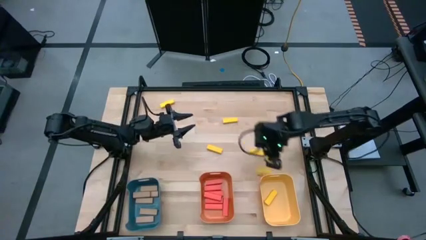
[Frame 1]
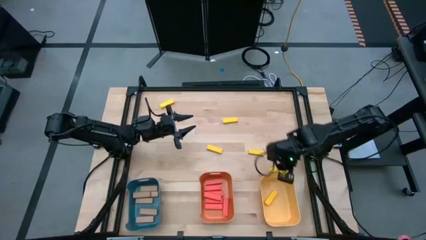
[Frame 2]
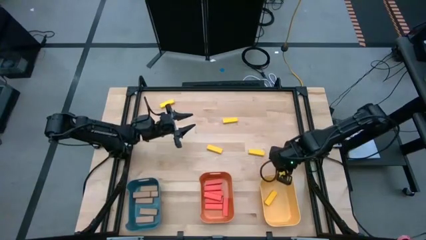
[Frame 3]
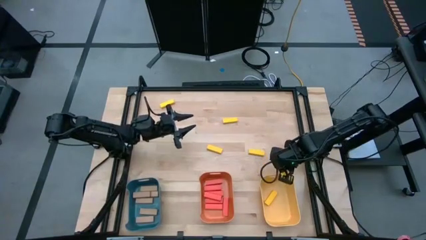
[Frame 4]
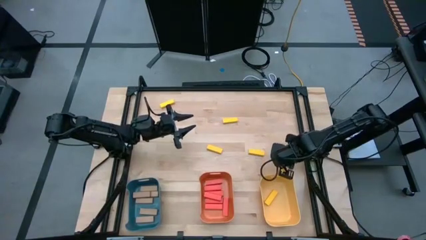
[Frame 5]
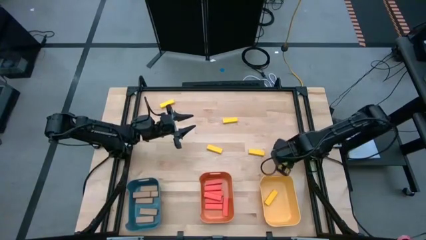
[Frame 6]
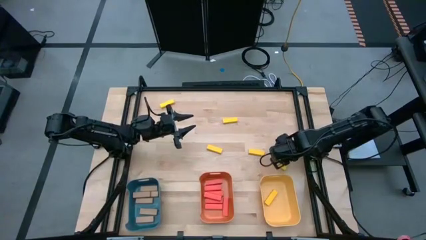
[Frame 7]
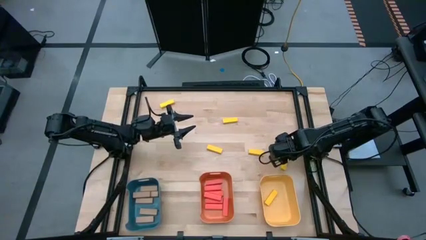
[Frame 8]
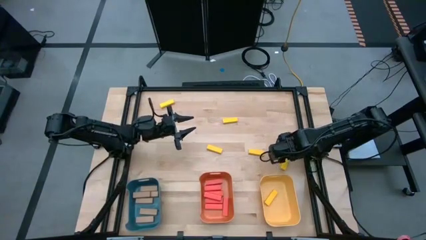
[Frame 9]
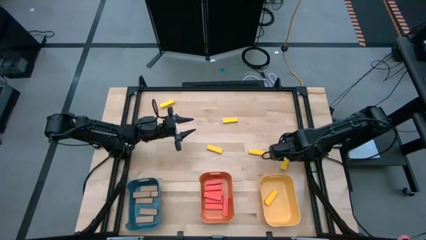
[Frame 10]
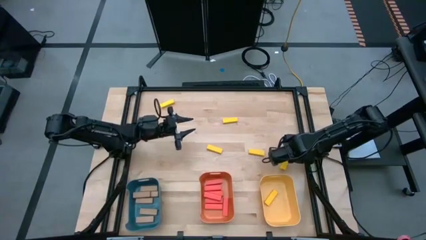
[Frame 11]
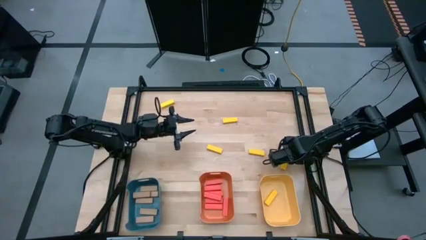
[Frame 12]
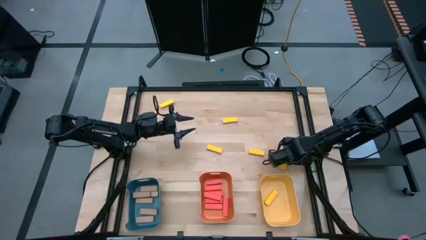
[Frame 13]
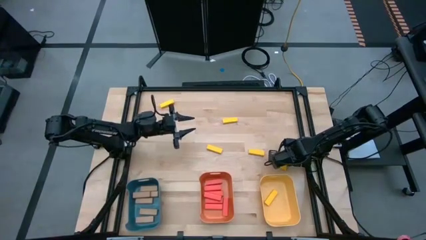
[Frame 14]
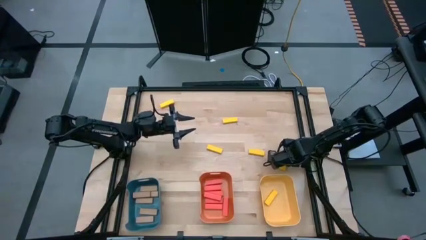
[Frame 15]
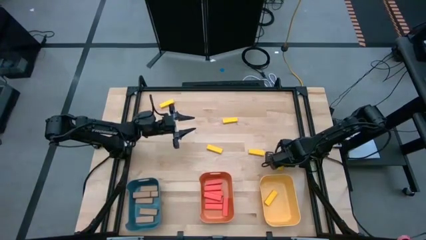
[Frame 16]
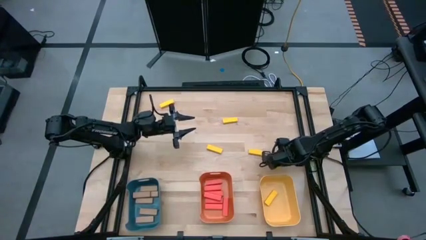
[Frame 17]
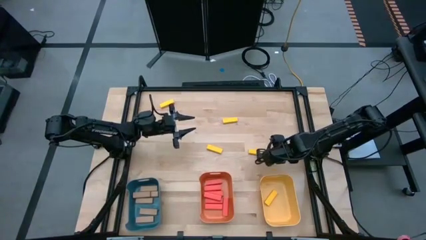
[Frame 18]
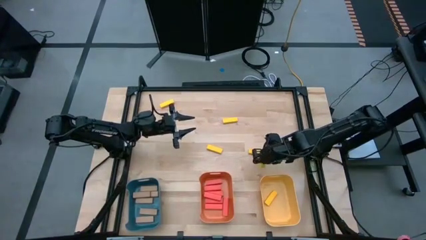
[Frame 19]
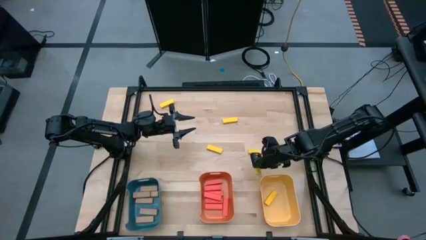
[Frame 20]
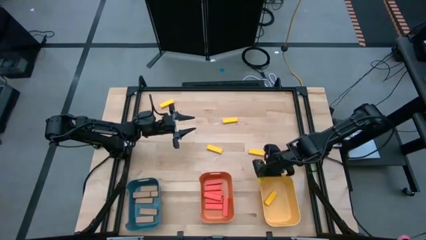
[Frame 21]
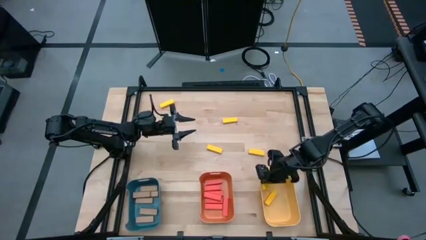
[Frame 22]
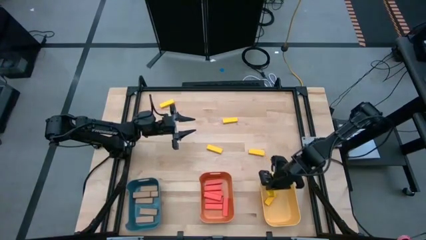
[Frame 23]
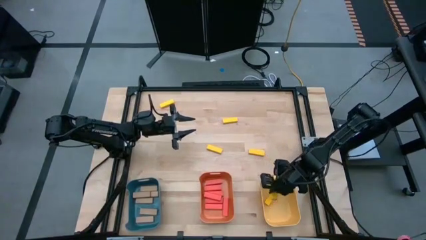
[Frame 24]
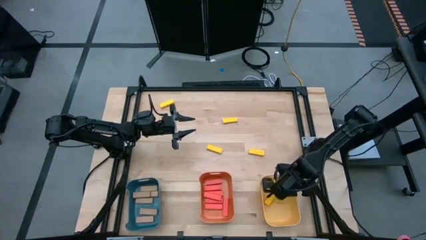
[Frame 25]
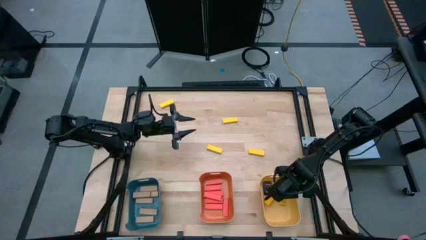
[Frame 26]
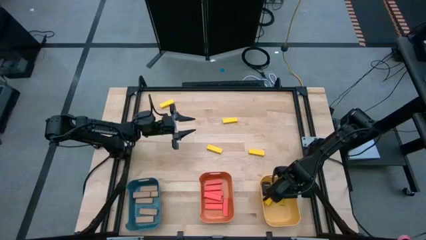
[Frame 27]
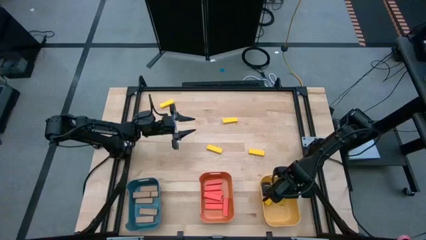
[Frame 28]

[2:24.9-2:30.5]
Task: Sort blocks
Put the bottom left yellow block into the yellow bin

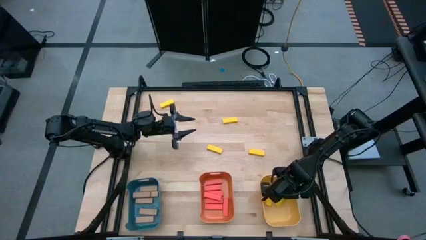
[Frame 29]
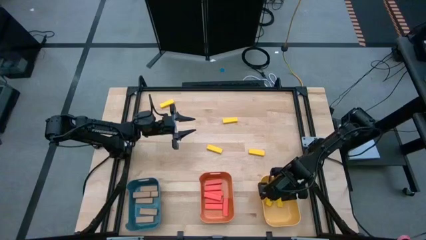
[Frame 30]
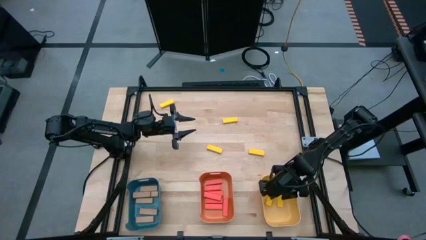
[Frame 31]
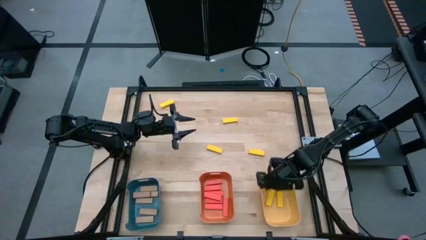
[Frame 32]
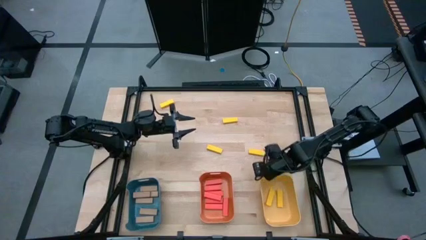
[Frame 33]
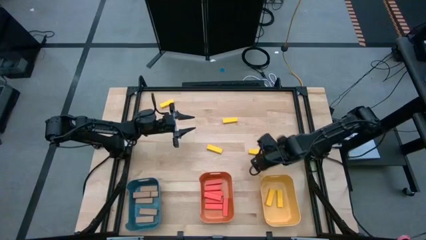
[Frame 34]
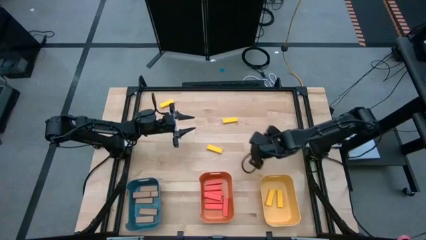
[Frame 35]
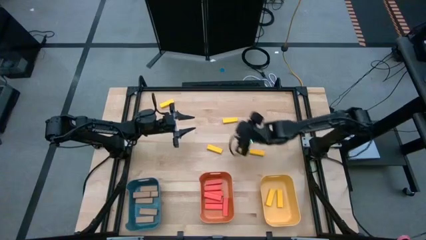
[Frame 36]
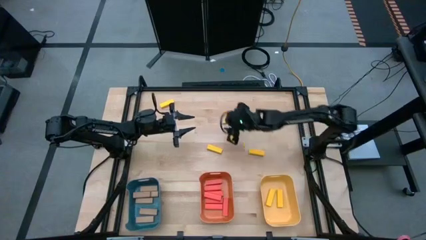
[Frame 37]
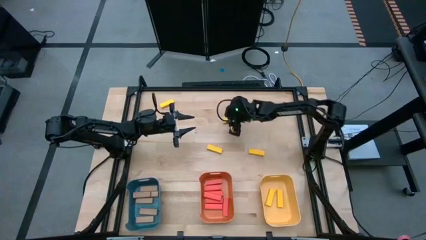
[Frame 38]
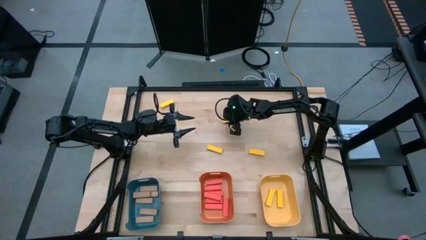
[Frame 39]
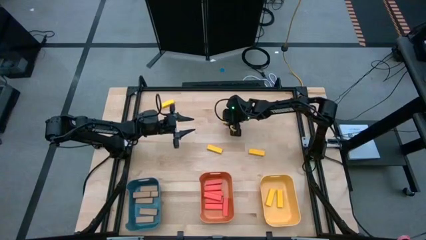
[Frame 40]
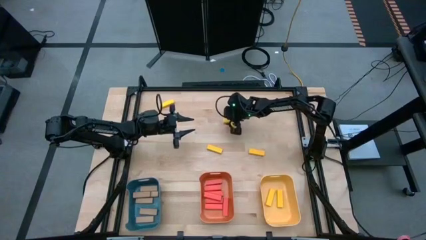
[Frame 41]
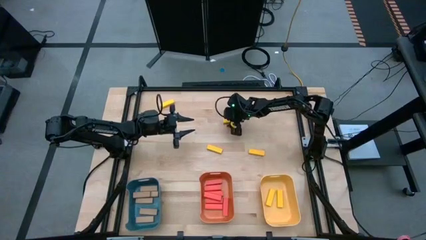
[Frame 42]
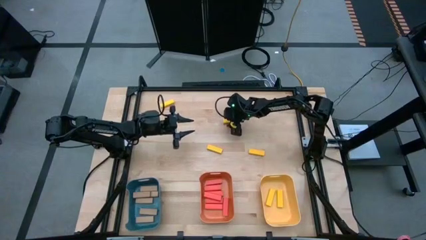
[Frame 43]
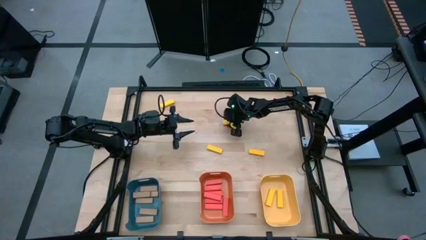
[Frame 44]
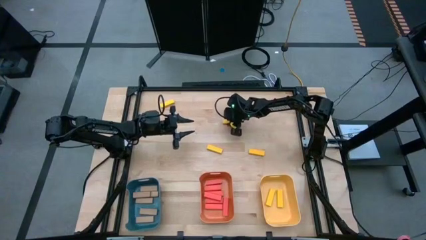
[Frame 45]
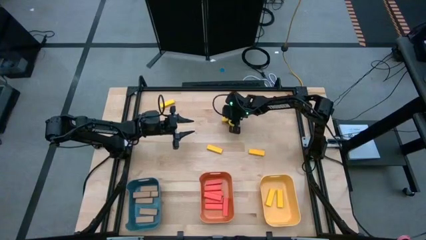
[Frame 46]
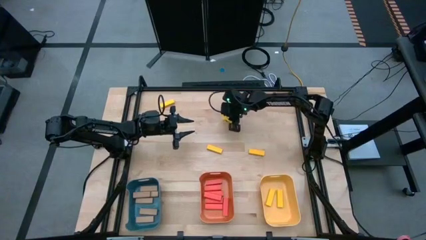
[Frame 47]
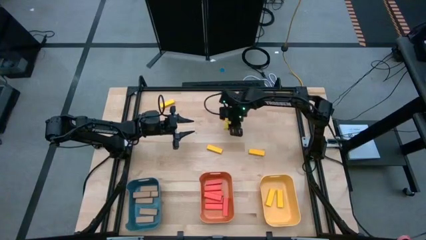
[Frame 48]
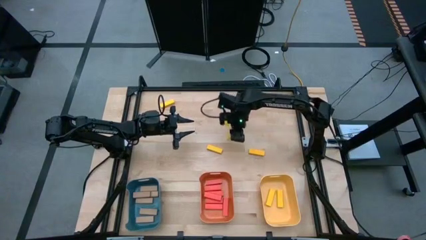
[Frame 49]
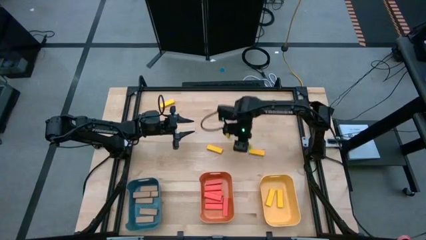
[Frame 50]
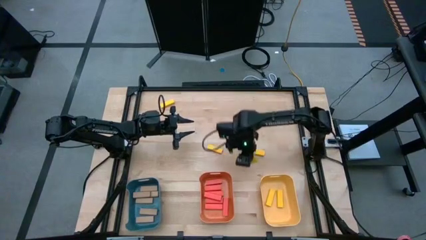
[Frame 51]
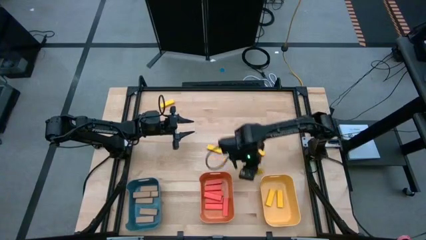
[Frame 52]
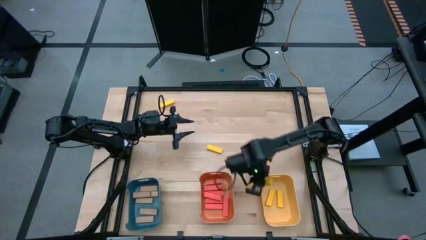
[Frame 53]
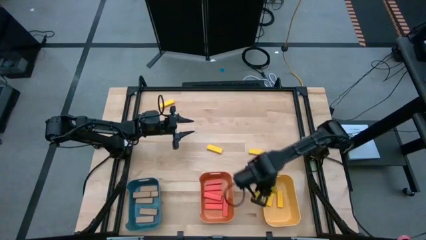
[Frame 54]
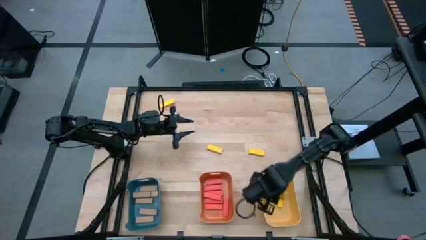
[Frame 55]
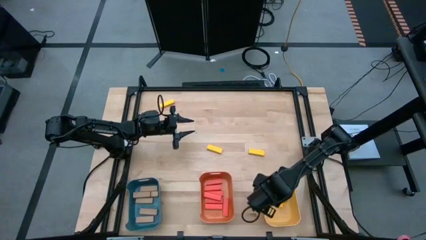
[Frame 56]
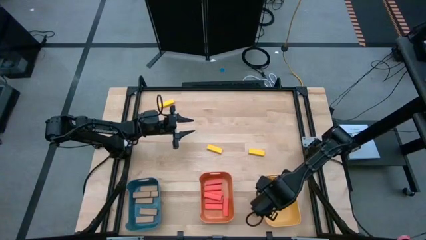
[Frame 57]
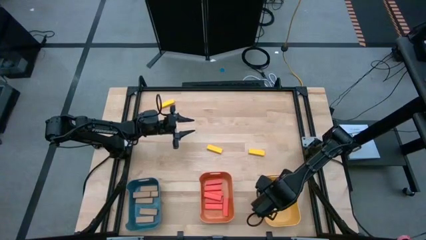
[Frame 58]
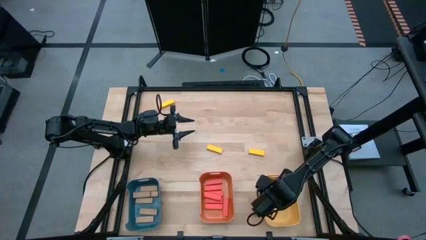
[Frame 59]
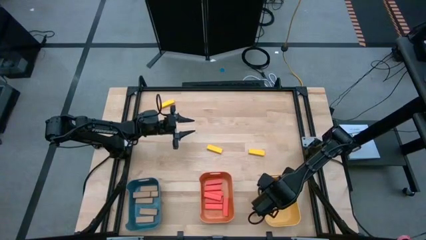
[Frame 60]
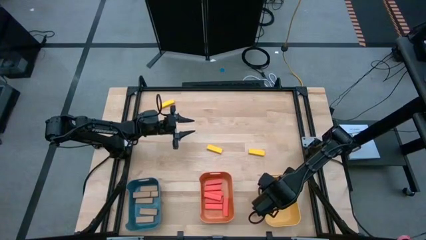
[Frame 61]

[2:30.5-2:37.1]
Put the top middle yellow block into the yellow bin

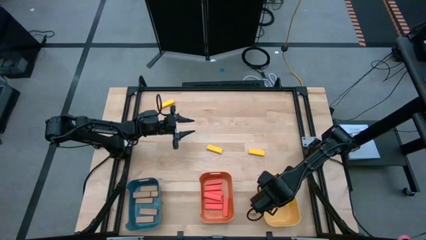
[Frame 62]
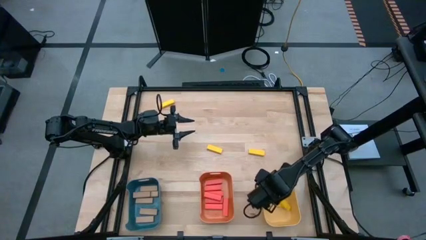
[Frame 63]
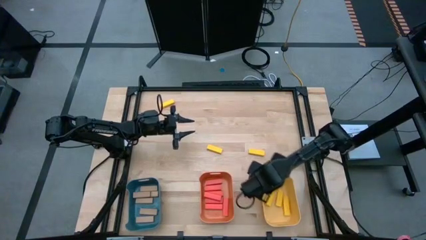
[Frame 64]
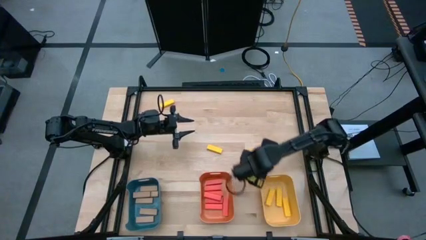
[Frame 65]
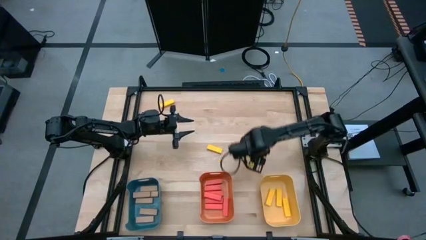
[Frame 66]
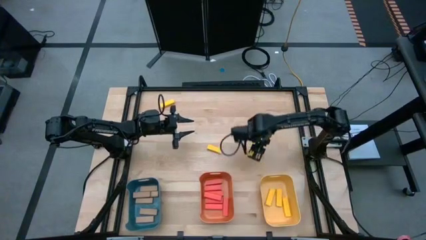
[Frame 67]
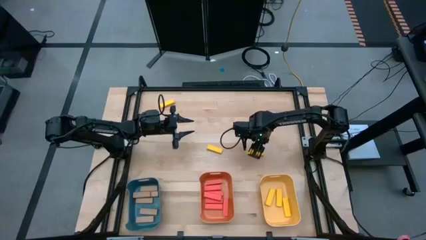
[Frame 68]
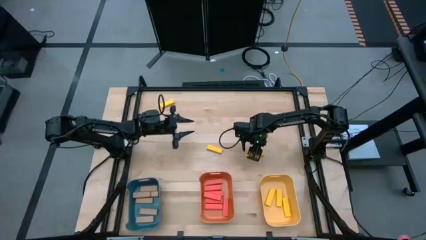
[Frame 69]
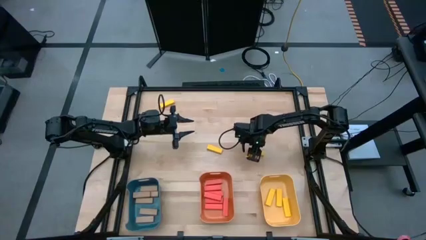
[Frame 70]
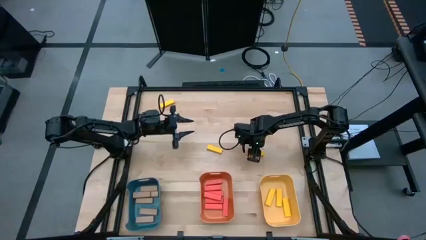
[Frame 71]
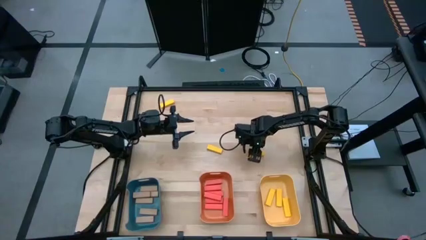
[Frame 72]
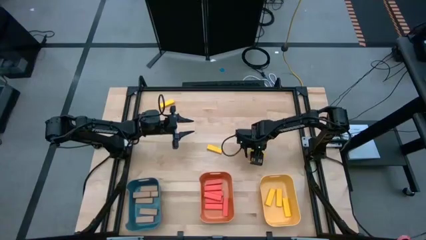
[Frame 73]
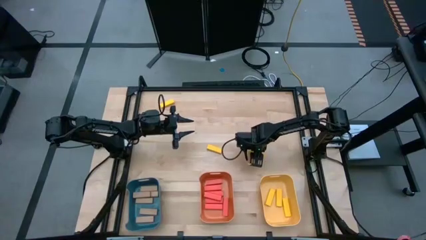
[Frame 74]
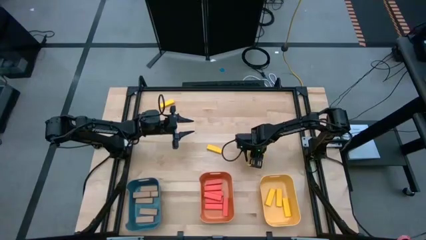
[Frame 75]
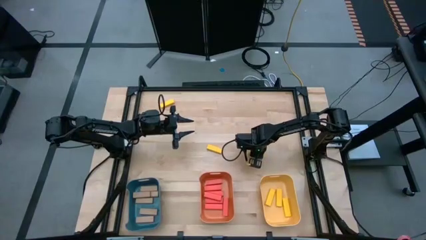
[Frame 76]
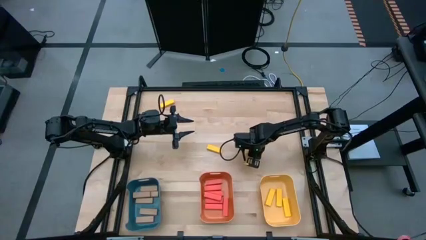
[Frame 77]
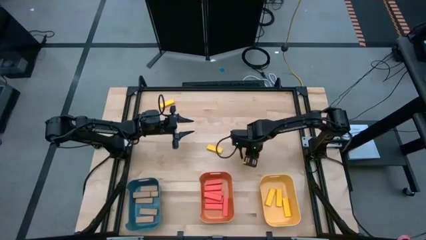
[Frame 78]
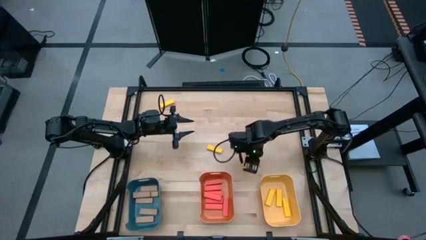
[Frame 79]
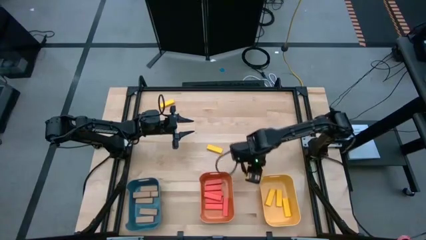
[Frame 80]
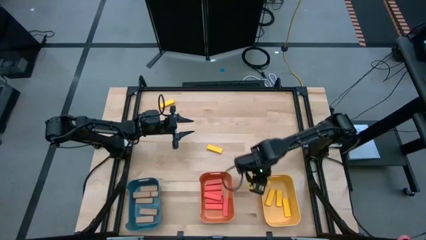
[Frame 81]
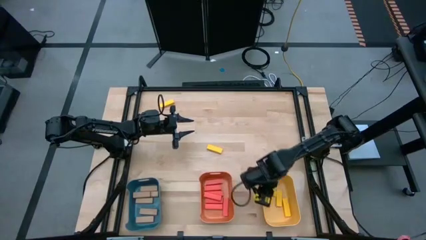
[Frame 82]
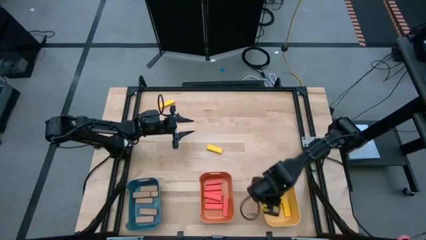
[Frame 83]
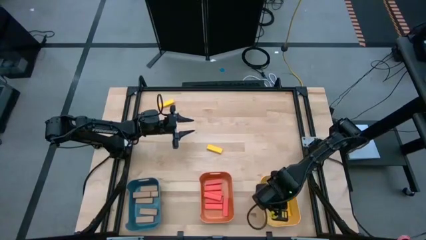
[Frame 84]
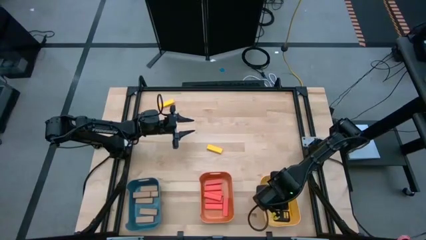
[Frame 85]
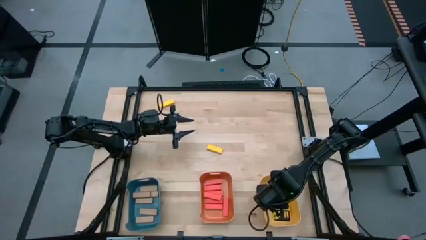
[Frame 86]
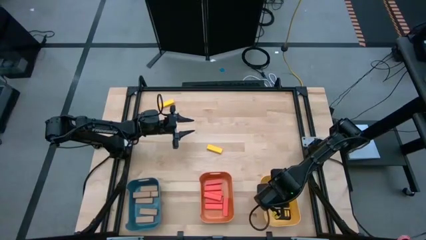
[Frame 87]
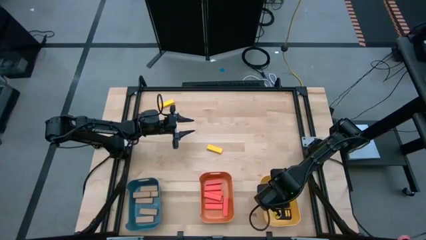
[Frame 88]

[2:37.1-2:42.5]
Put the bottom right yellow block into the yellow bin
